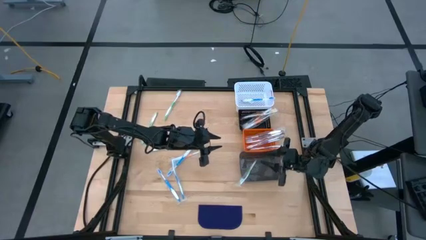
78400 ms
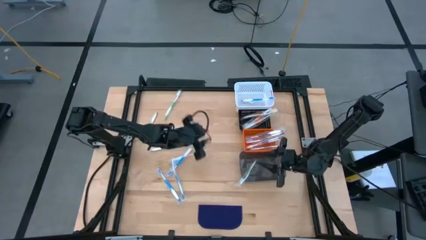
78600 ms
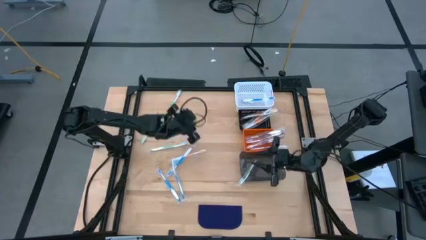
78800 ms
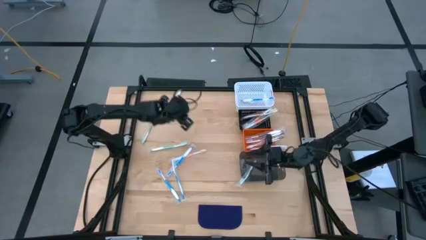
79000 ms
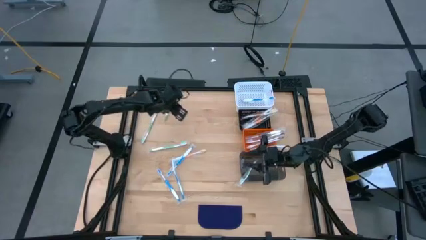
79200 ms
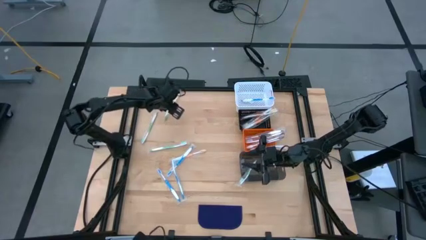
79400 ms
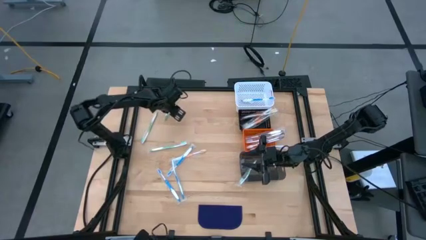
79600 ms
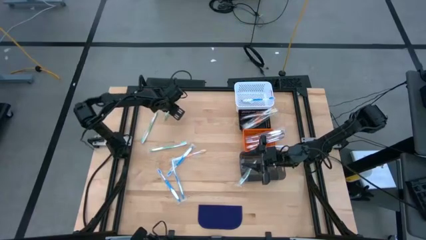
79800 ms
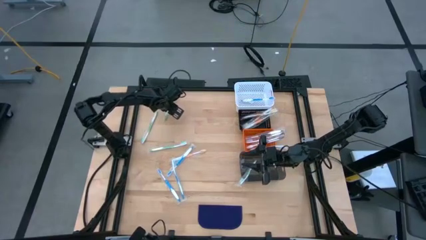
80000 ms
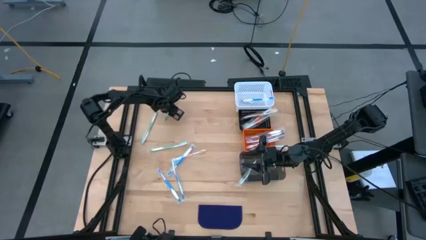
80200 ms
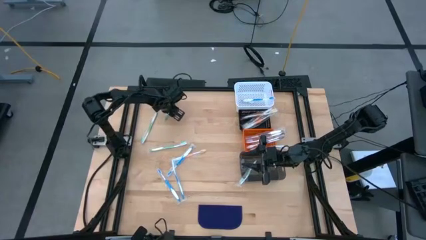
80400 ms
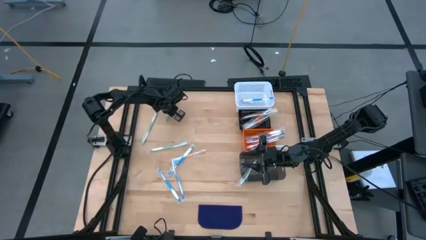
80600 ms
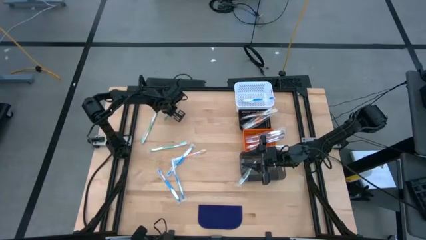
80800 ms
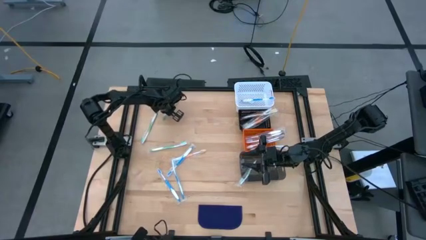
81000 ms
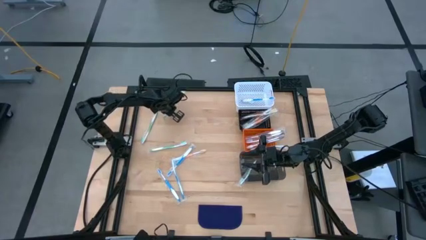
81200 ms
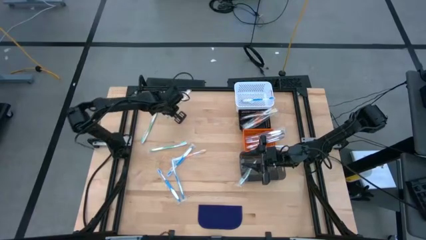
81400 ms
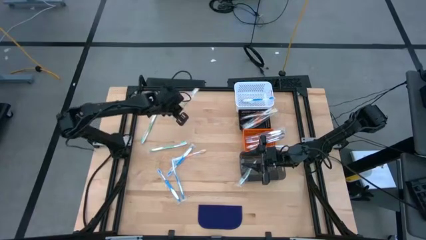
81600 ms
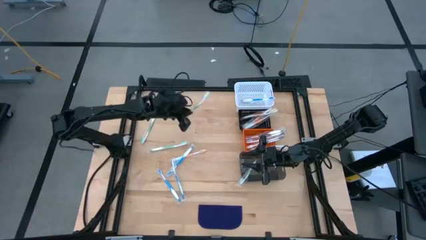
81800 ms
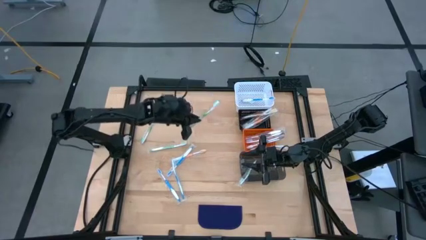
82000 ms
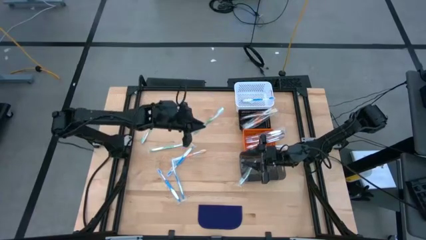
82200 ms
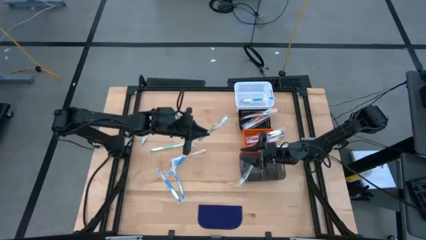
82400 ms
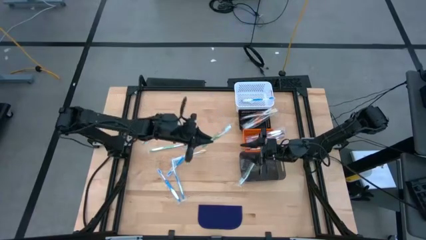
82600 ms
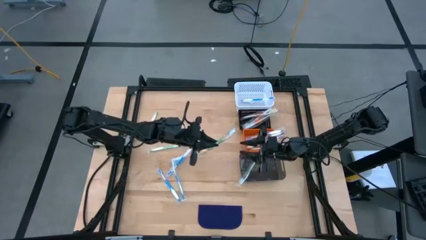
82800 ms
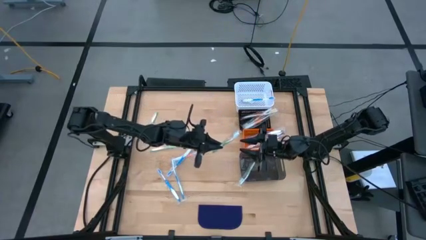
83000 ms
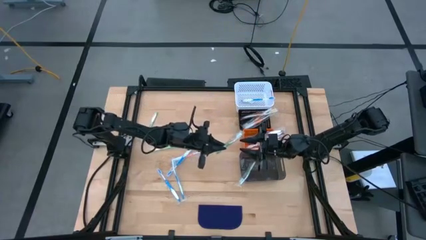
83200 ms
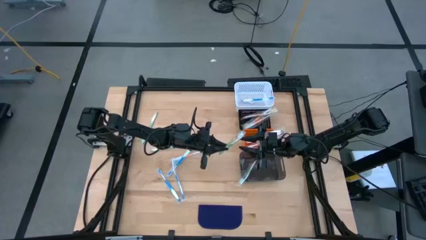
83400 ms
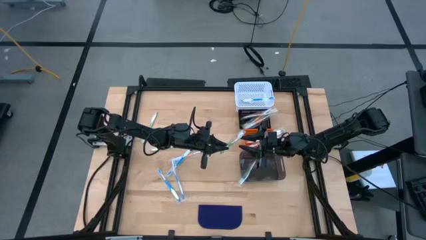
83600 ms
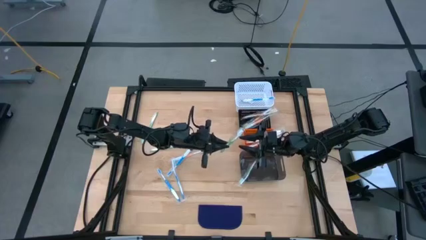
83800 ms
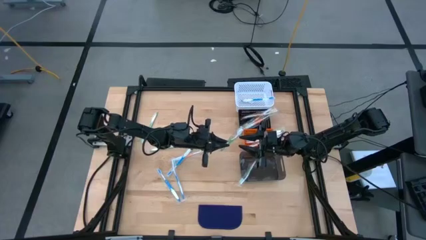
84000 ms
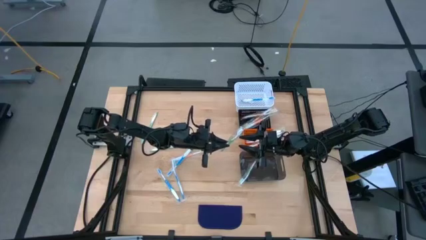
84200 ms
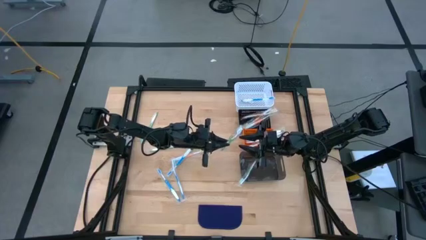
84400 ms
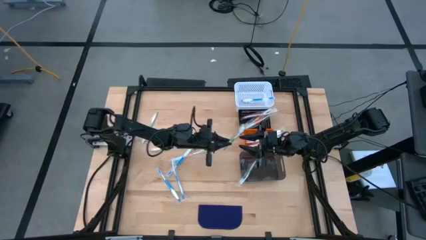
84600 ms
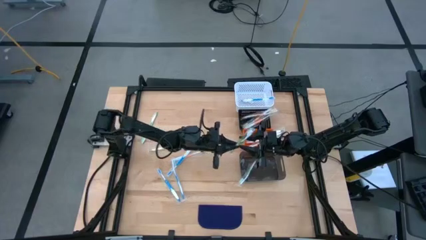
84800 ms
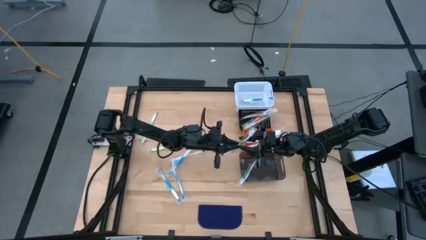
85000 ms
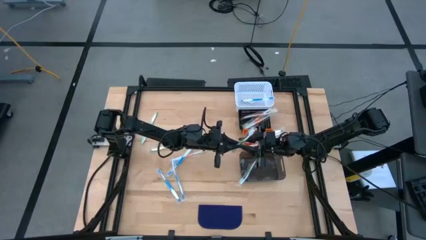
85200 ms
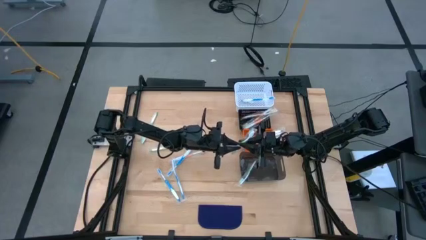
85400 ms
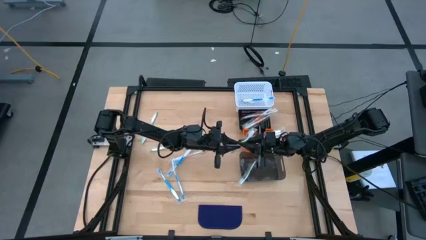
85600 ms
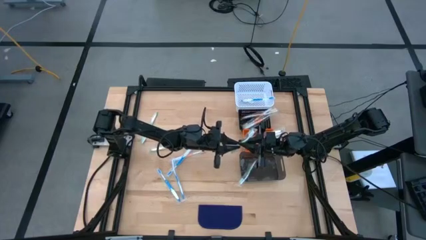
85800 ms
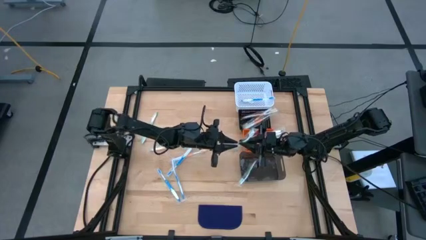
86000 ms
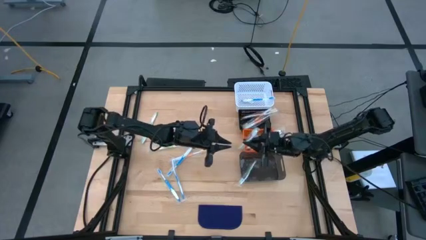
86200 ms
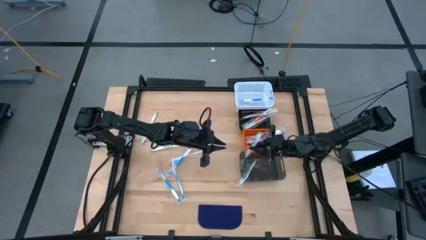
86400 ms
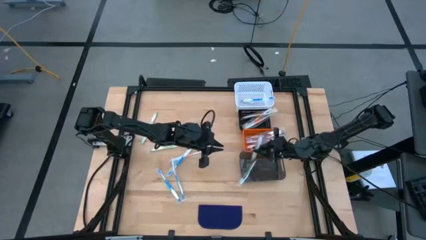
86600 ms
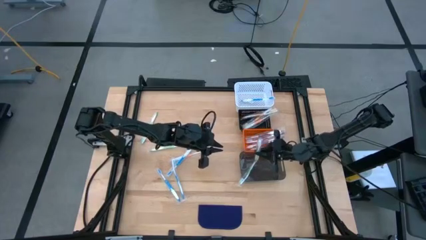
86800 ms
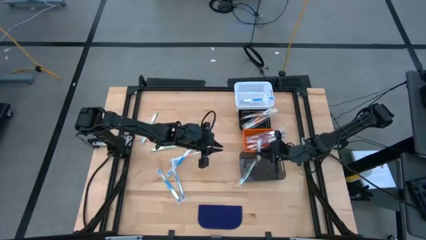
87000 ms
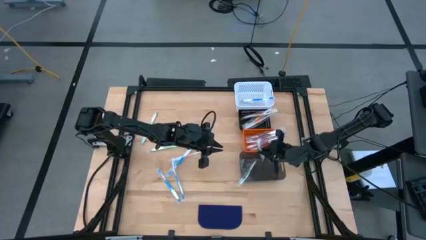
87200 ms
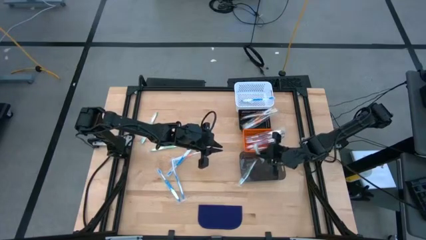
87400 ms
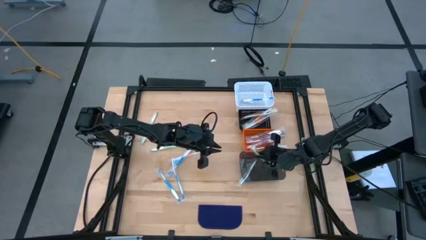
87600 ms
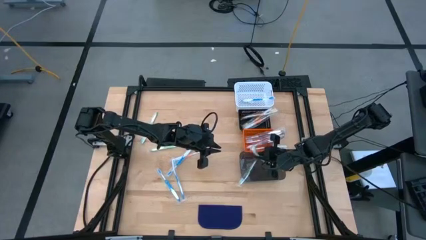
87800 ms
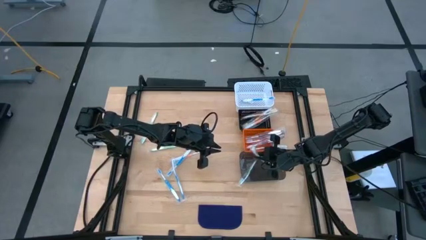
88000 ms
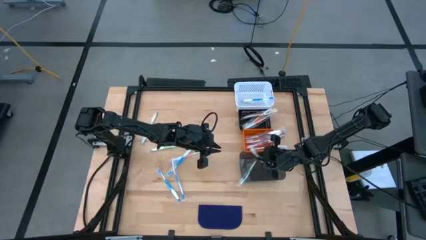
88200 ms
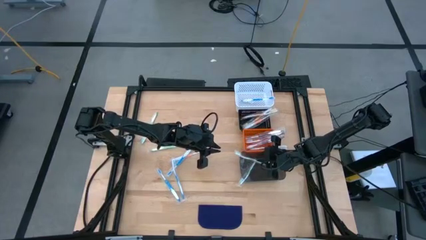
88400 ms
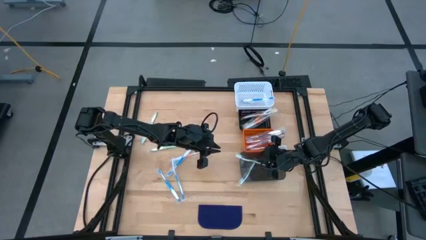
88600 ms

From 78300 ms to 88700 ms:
Task: Pick & Place Toothbrushes
Put the green toothbrush into the transparent black bin

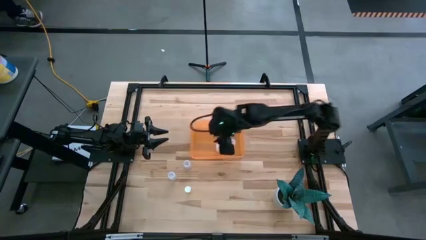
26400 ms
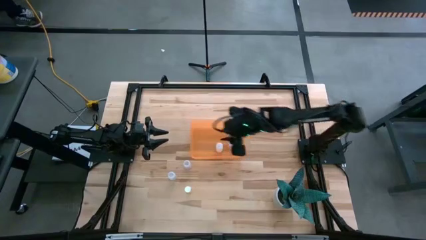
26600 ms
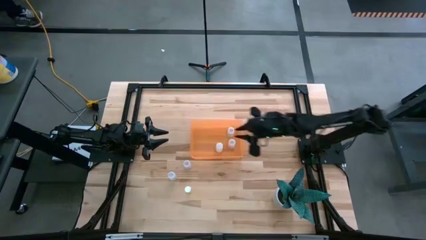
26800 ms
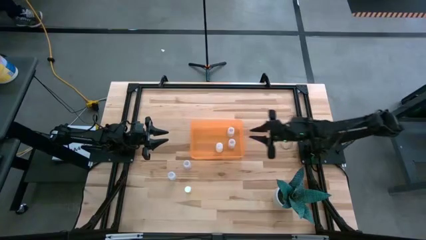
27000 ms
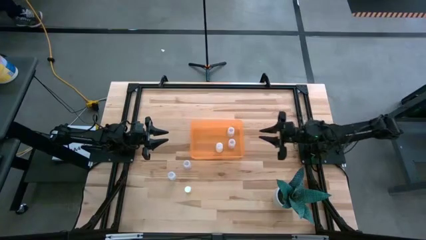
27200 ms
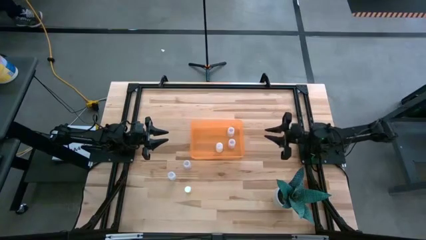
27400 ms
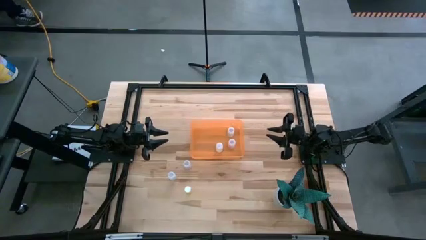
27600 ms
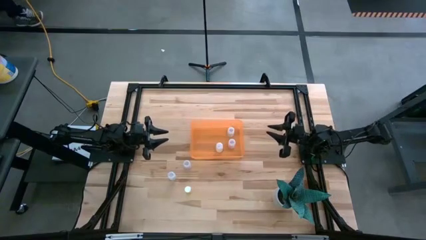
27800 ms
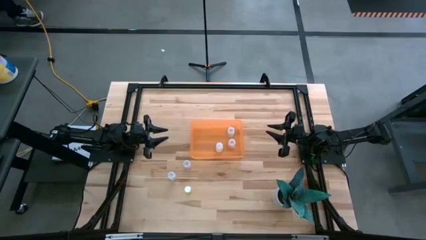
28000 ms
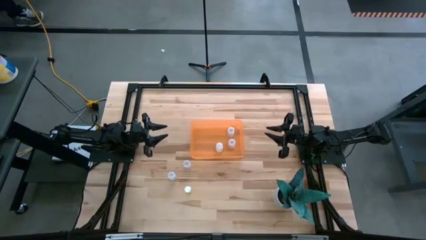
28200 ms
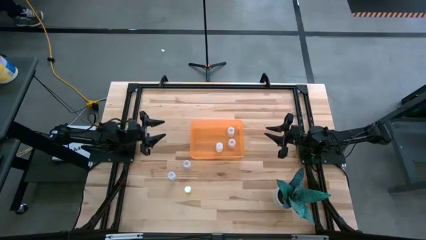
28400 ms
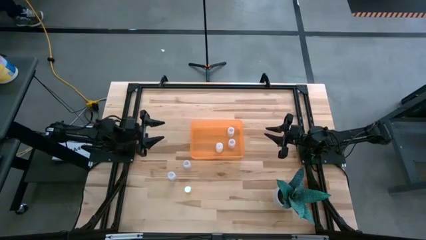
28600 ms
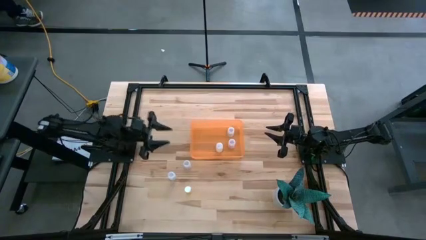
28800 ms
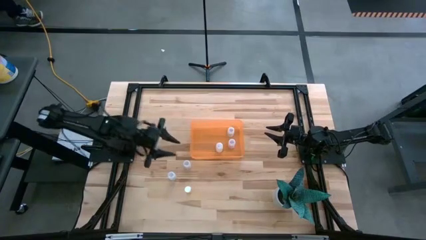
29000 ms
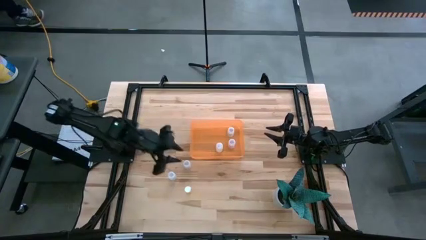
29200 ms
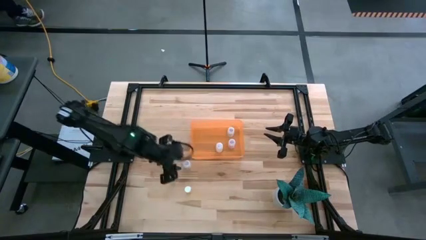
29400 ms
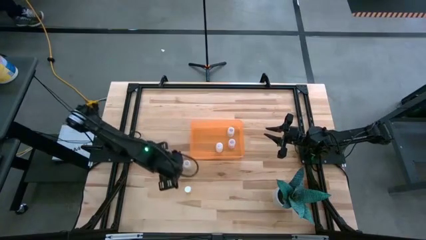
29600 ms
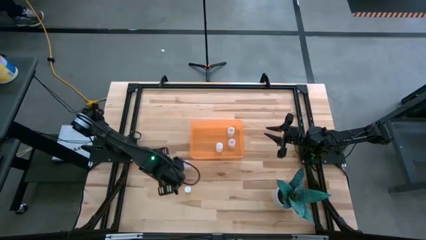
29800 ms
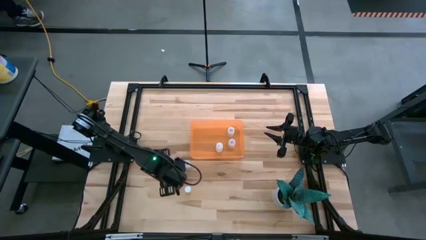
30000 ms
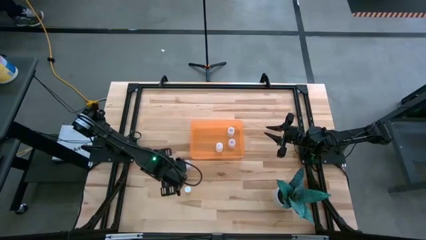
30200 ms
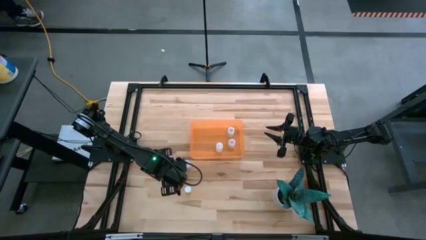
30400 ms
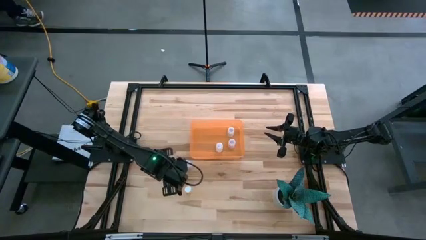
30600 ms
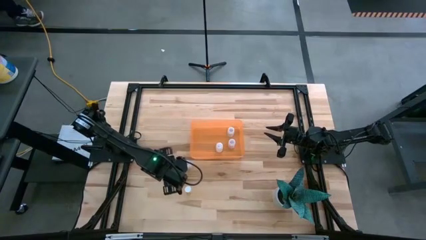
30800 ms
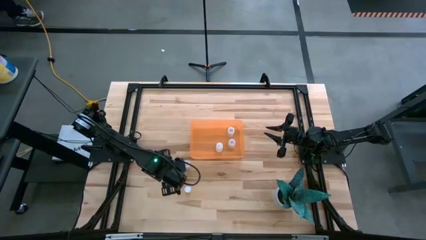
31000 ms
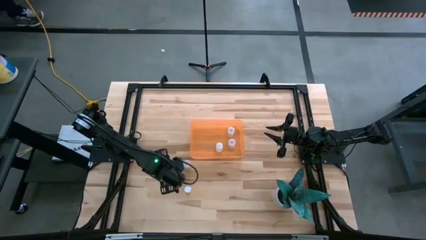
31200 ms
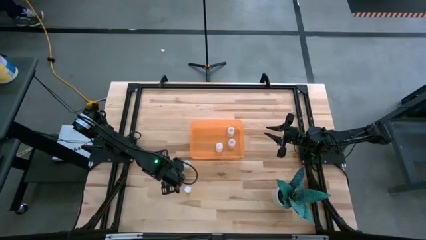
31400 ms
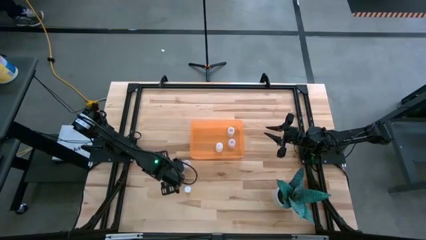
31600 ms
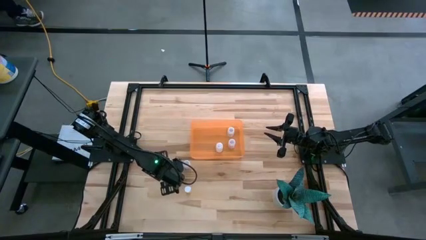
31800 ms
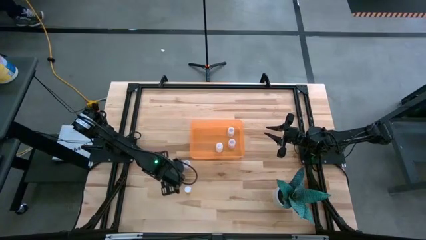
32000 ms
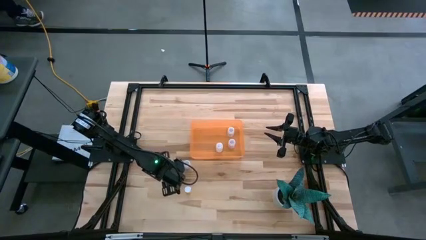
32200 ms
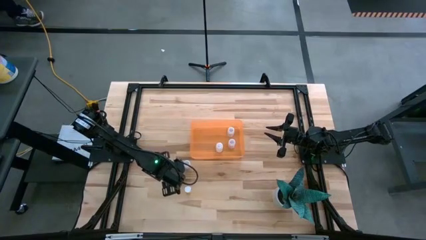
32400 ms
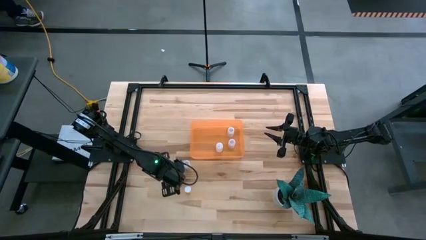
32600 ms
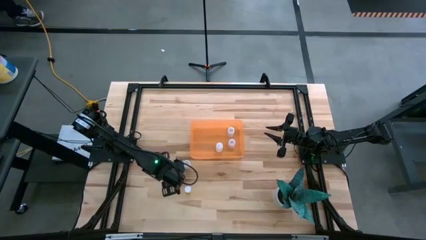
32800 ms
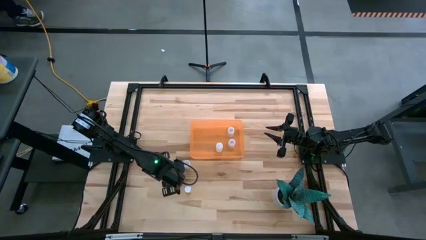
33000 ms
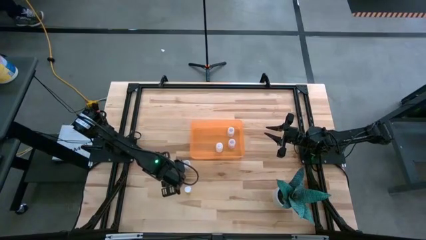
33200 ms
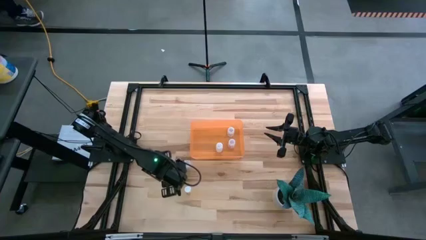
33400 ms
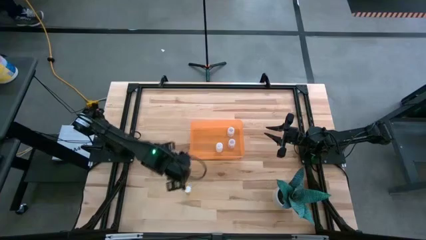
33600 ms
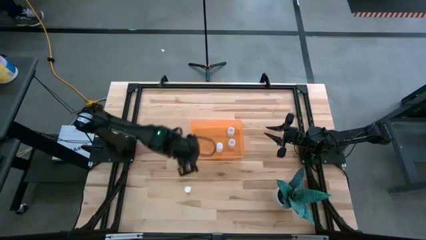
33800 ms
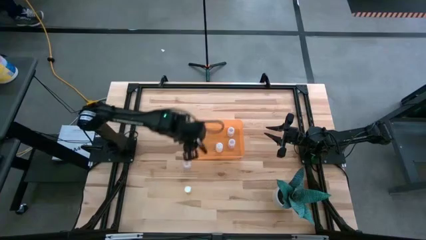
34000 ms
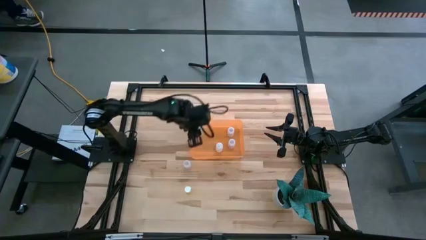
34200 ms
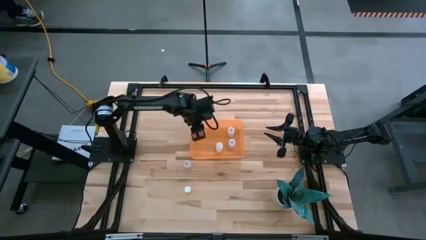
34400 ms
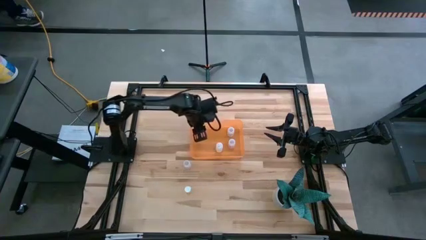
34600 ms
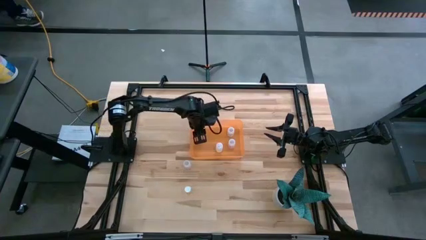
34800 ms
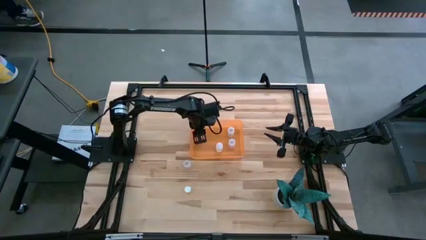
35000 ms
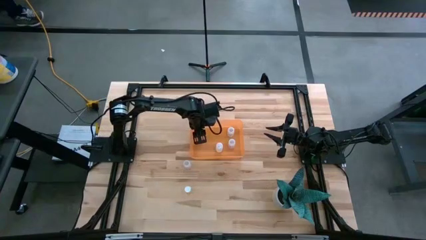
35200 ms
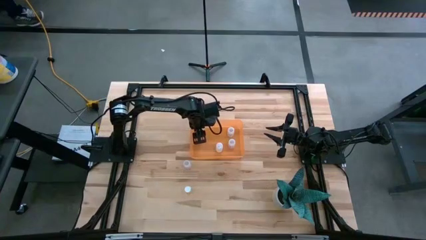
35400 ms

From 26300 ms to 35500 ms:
Task: Pick and place pill bottles into a basket
Put the transparent pill bottle in the orange bin
